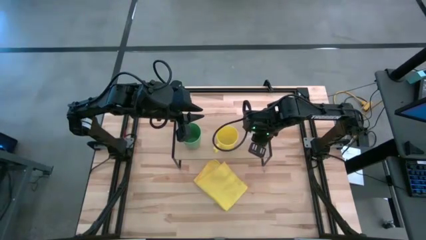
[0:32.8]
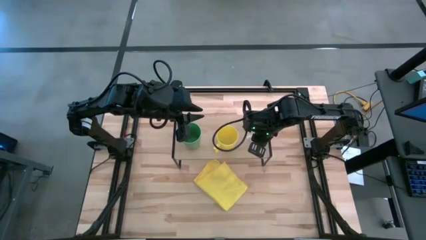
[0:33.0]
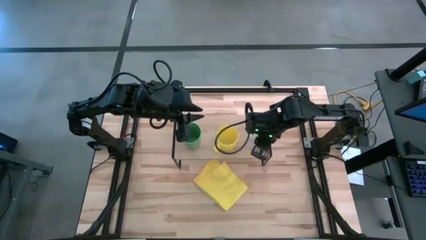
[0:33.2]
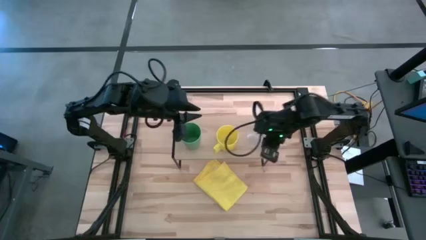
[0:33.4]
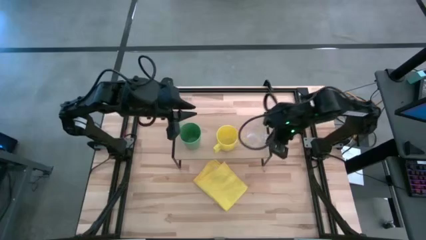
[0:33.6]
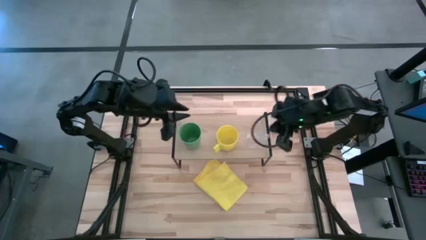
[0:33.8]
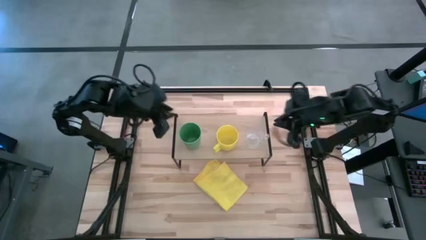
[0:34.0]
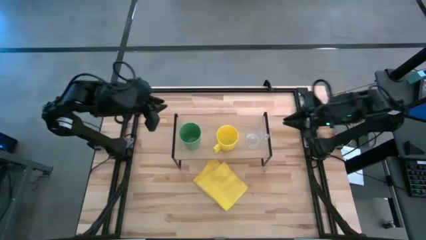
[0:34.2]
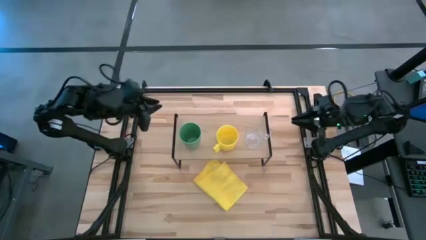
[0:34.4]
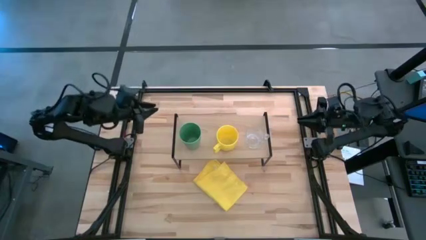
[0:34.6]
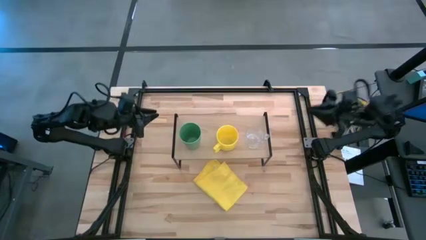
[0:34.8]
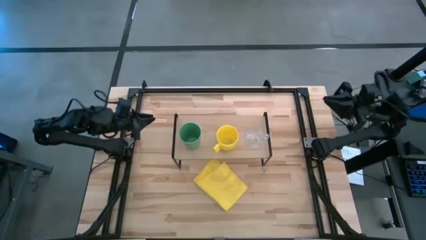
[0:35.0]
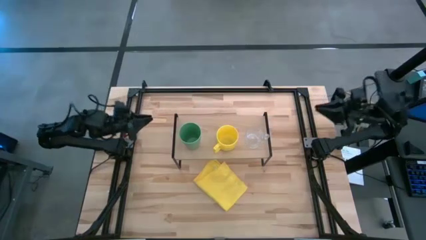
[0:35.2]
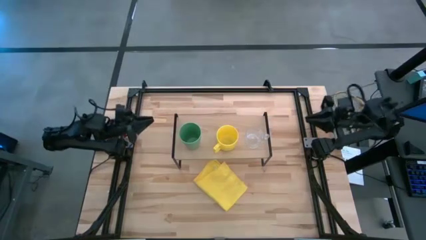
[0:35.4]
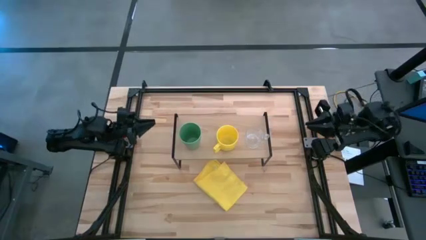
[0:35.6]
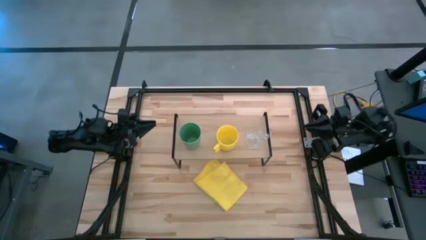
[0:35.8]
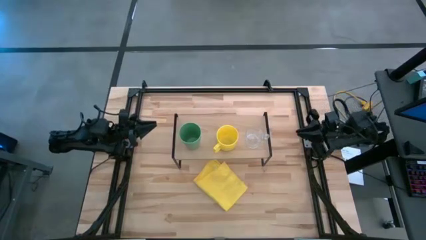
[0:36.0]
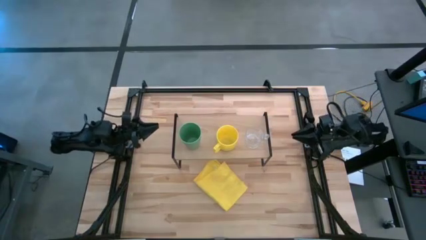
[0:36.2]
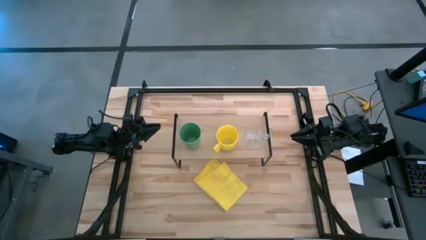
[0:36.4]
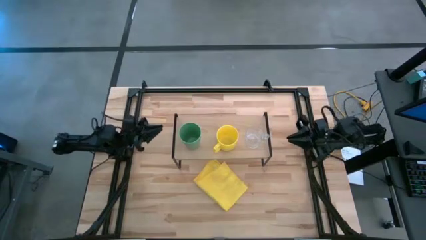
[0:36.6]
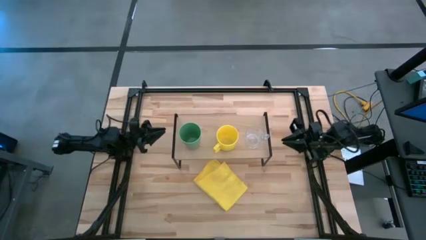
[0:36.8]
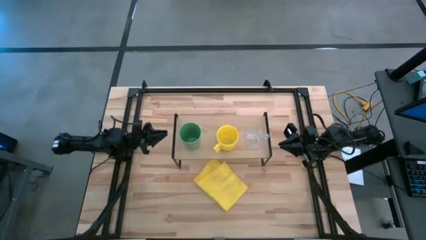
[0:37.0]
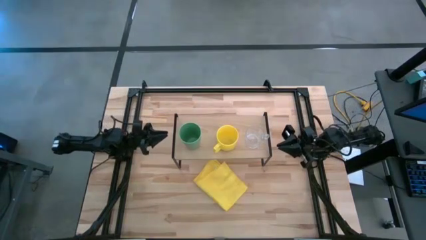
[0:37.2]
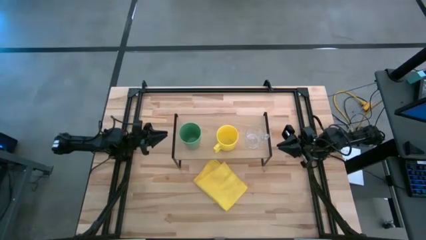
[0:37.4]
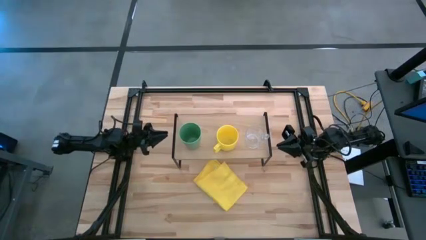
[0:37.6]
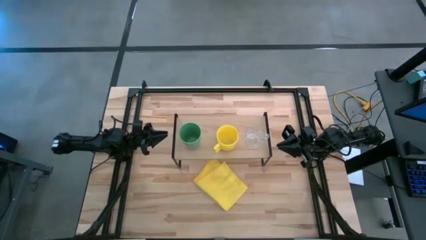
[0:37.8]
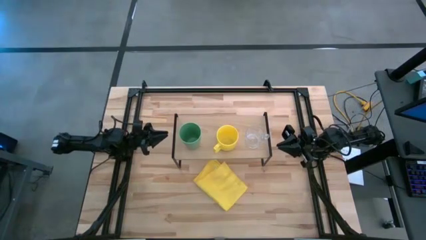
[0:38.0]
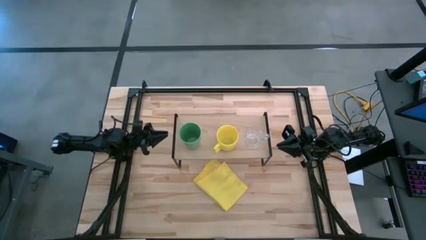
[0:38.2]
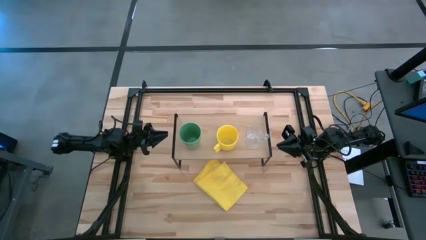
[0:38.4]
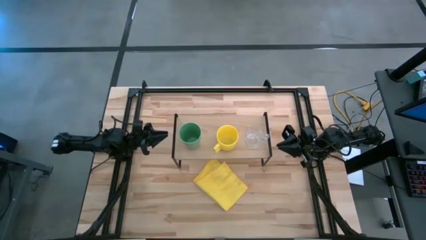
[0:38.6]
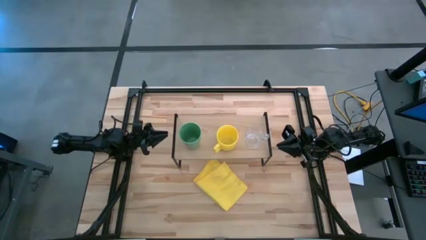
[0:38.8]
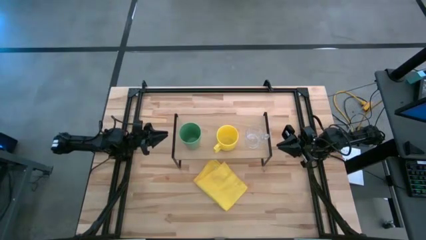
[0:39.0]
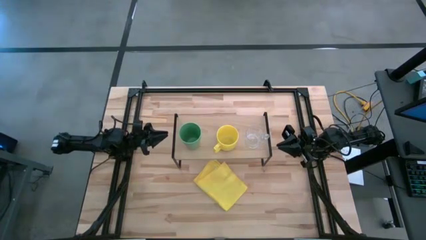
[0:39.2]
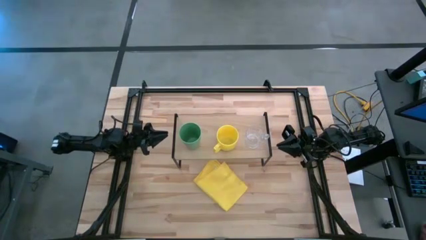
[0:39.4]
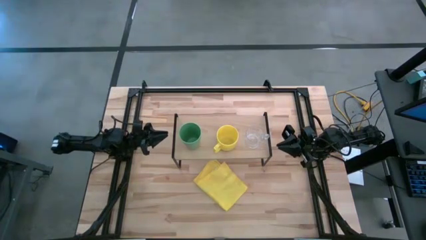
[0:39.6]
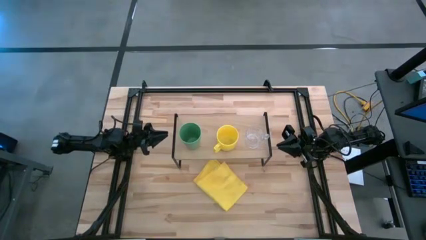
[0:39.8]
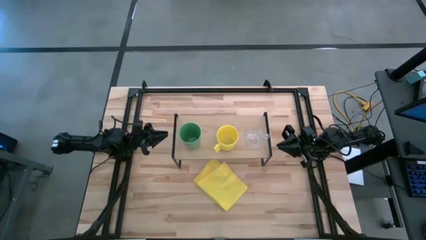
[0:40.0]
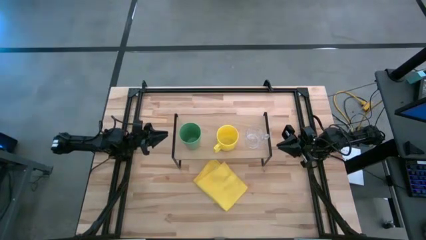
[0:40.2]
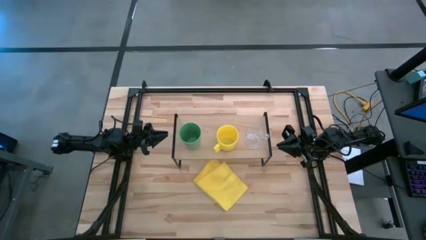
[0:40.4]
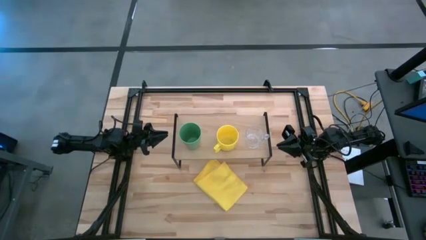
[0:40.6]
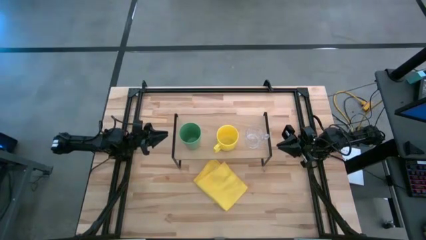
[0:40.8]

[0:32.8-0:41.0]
Task: Stack small to large cups/mugs on shelf
Return to Home Position

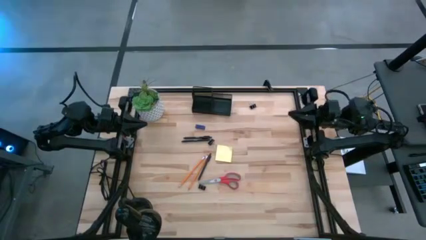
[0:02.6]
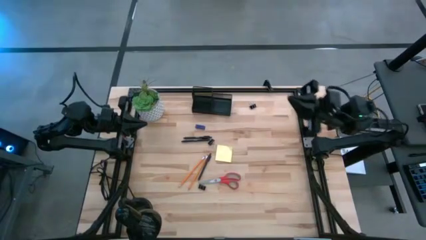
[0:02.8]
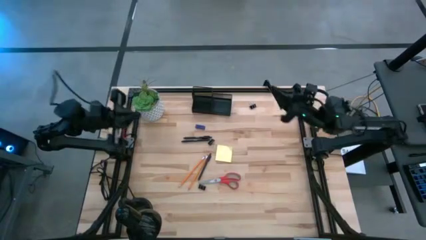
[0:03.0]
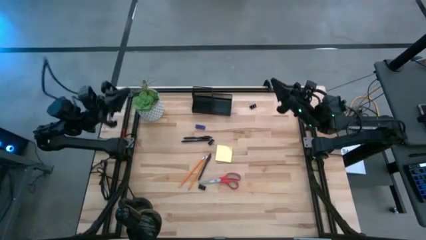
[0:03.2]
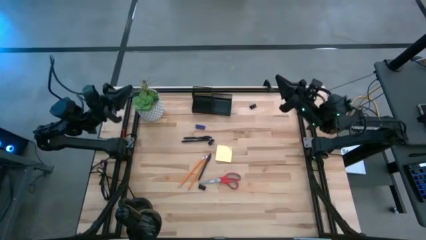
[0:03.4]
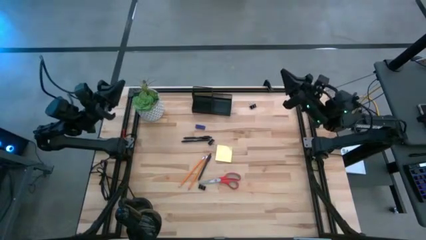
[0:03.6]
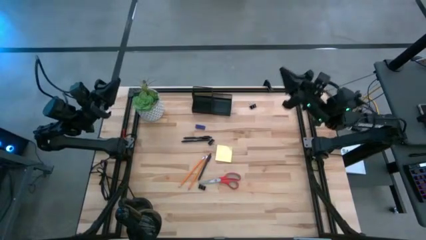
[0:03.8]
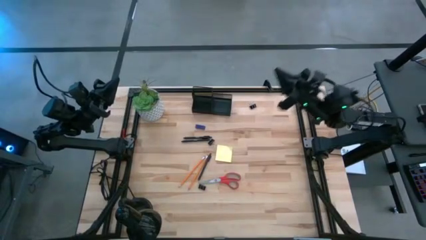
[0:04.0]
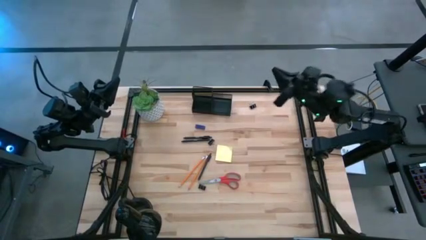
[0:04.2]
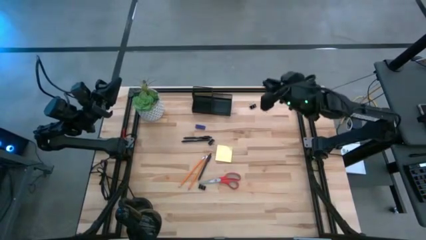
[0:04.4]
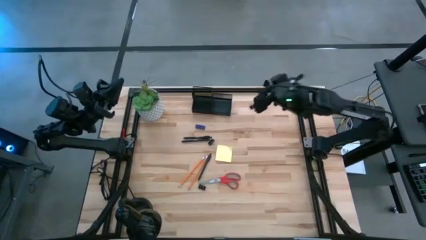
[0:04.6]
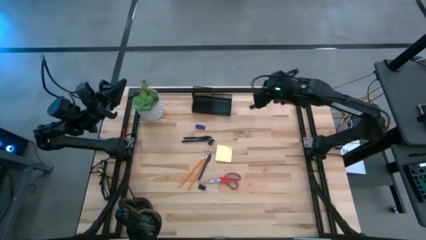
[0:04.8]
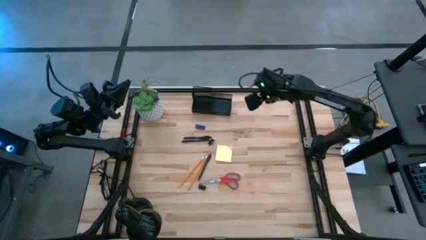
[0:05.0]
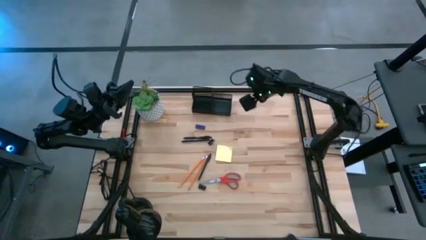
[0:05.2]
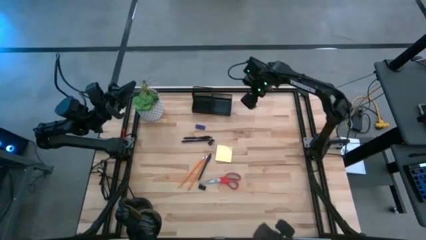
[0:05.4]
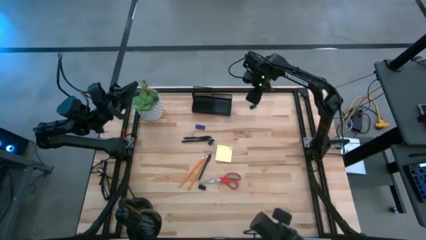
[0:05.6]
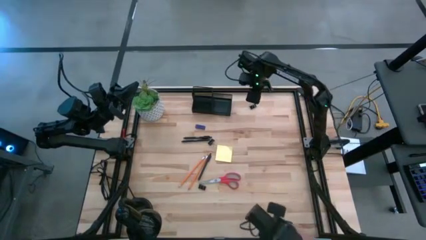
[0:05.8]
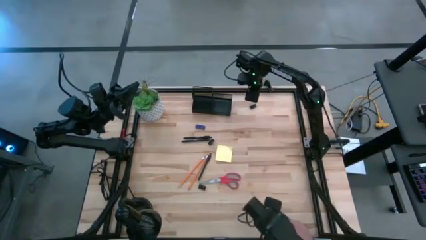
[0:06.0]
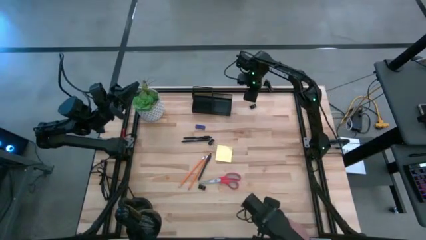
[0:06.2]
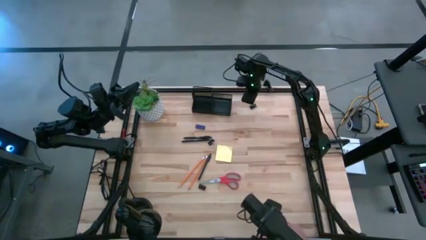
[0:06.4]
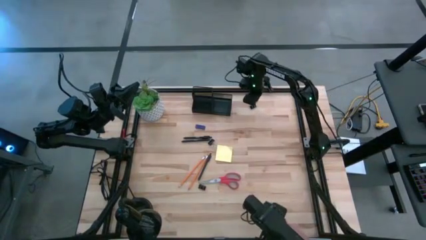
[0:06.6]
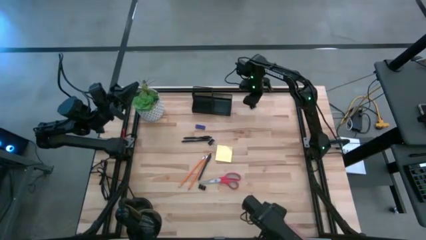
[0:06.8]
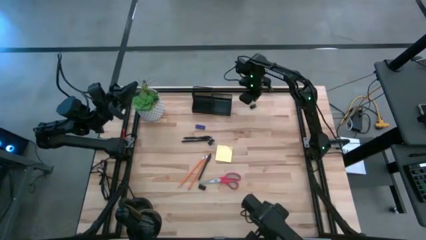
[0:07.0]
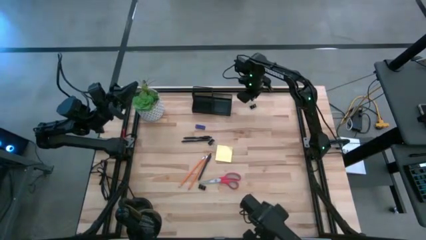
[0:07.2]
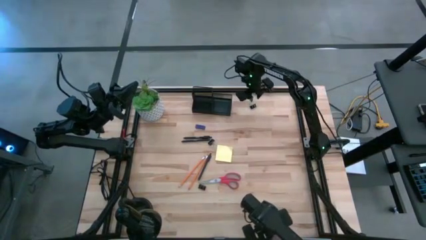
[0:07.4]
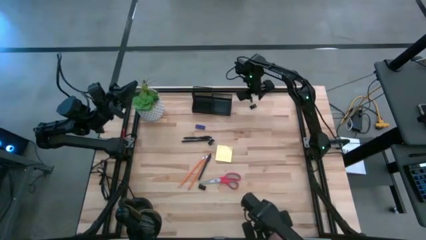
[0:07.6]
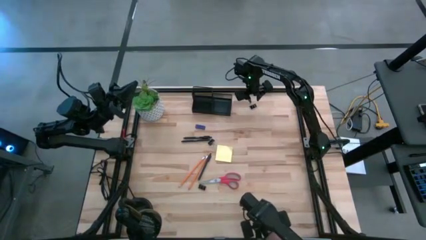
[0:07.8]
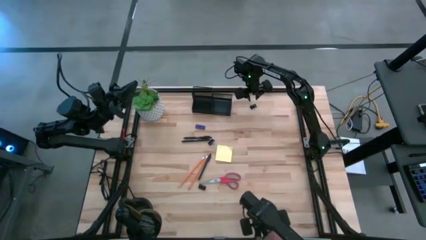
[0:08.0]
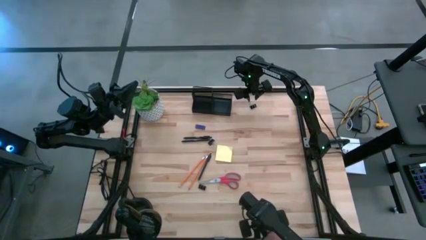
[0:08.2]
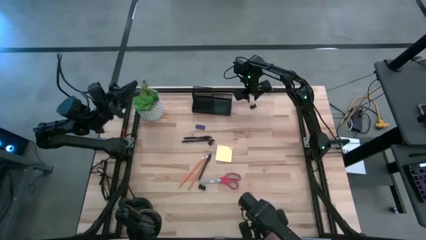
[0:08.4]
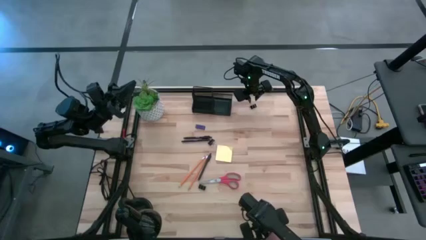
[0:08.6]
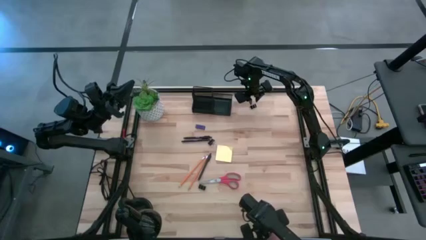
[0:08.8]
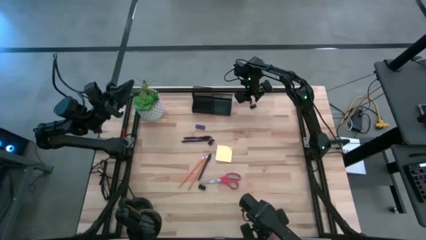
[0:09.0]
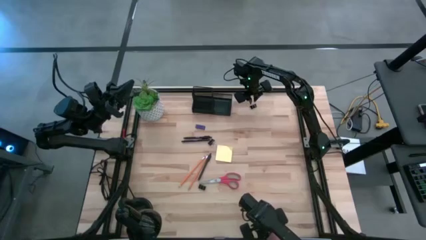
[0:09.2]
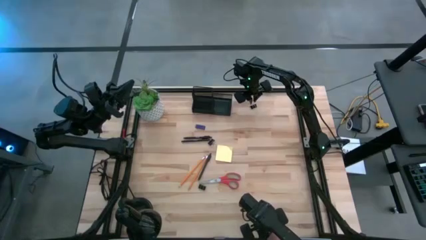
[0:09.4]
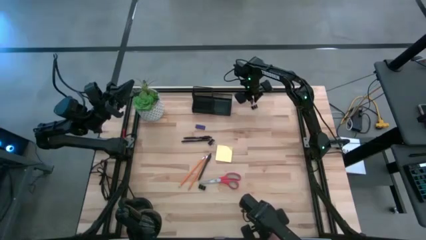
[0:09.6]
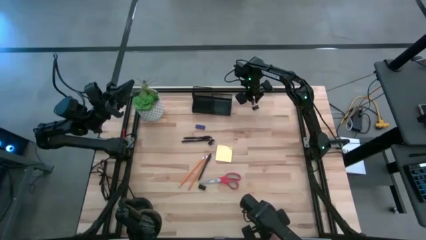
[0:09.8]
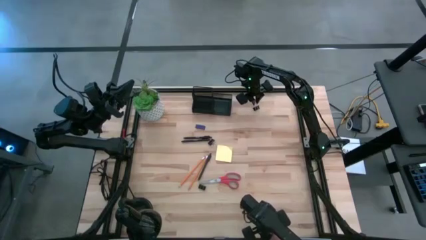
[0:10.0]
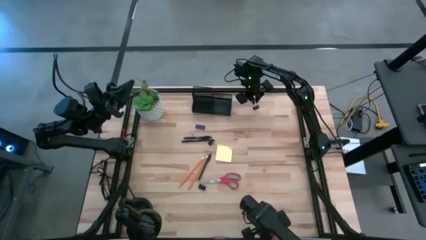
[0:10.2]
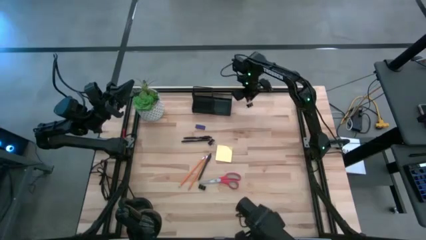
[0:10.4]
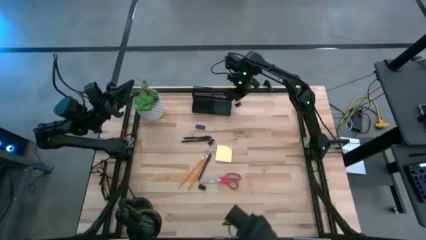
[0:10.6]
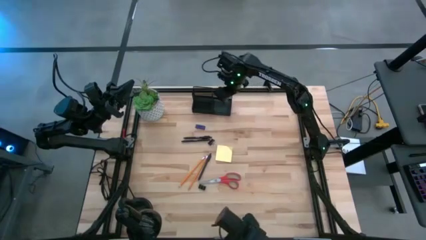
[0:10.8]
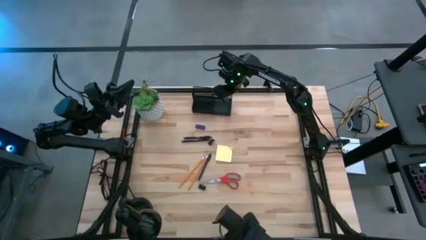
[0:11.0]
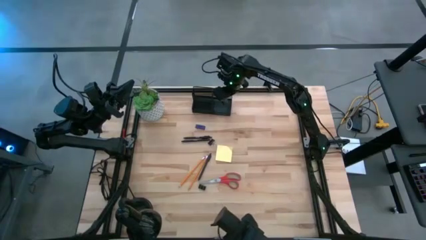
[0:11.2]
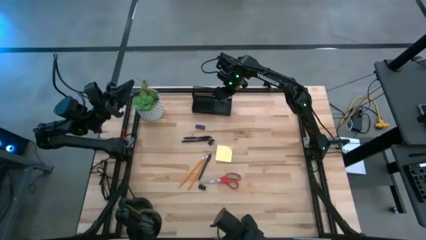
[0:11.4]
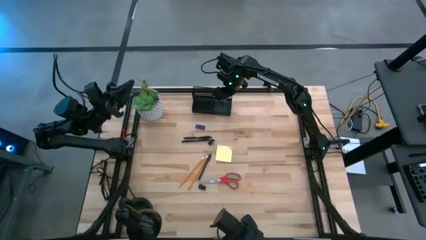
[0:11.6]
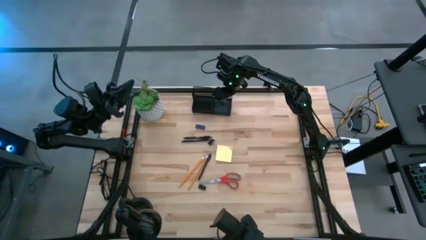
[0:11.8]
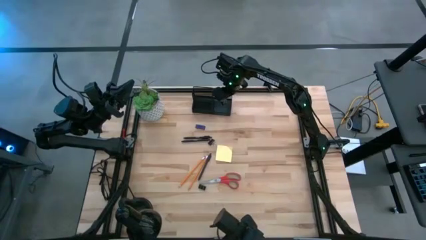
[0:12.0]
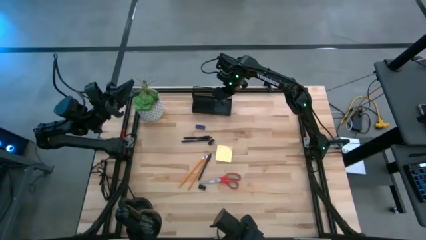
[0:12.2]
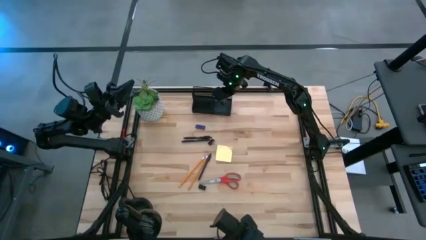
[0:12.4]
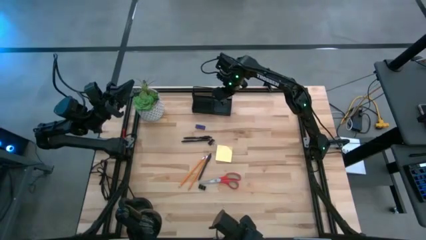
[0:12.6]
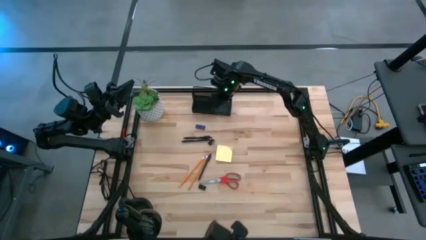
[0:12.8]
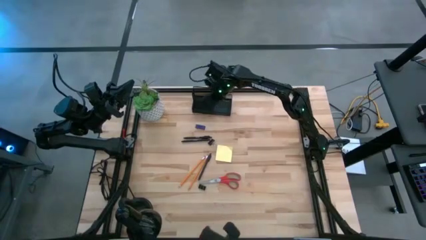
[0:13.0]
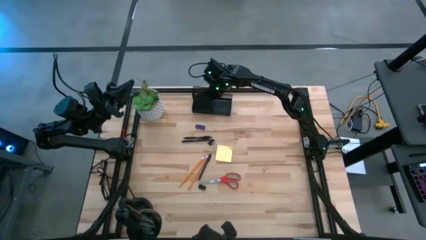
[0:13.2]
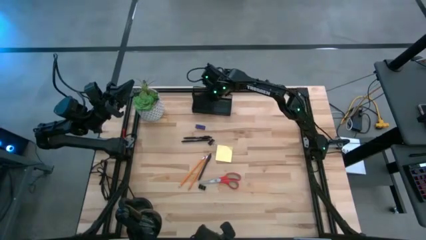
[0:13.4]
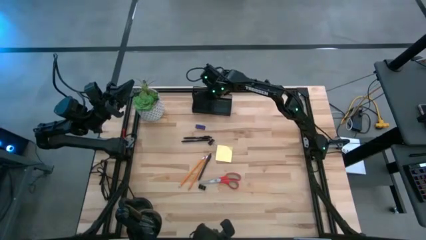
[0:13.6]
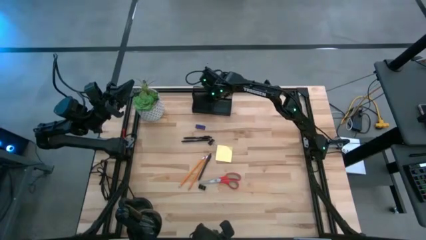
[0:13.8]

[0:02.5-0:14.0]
Task: Pick and place office supplies into organizer
Put the top black binder clip into the bottom left section of the black desk organizer
